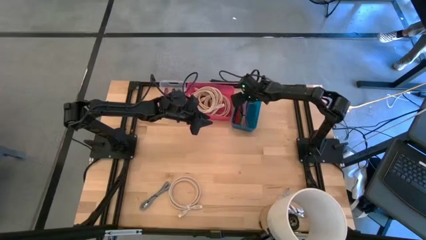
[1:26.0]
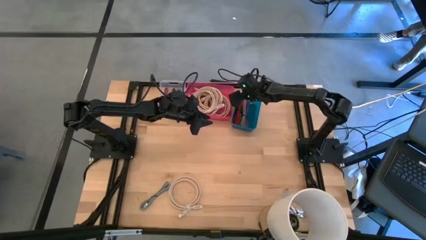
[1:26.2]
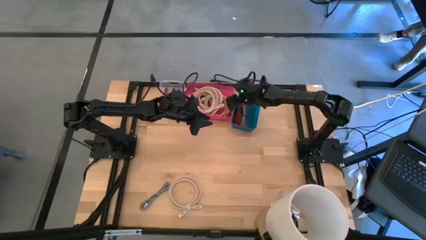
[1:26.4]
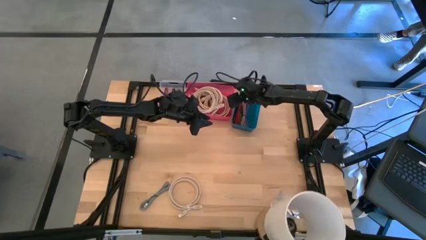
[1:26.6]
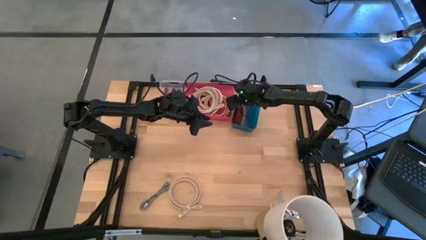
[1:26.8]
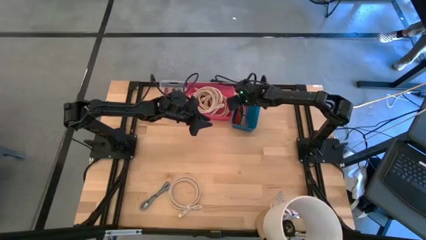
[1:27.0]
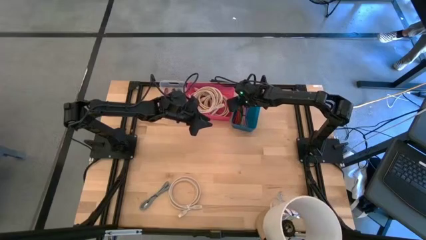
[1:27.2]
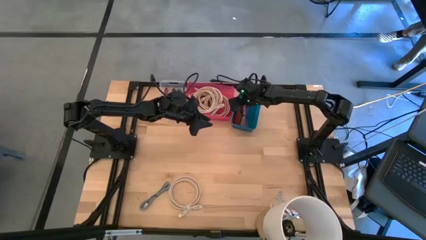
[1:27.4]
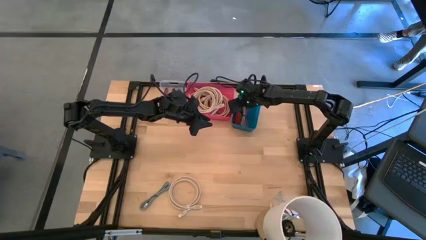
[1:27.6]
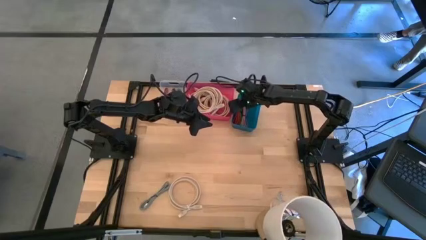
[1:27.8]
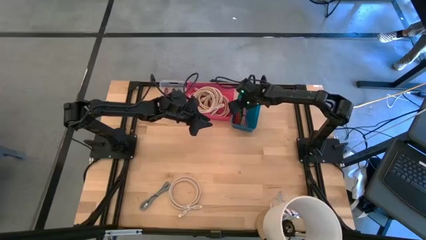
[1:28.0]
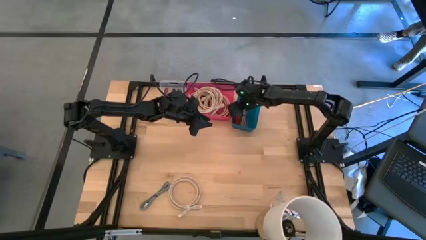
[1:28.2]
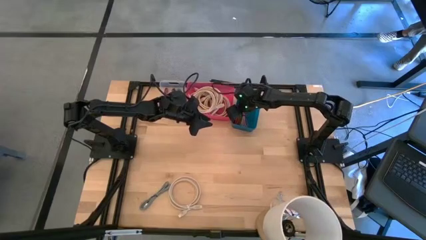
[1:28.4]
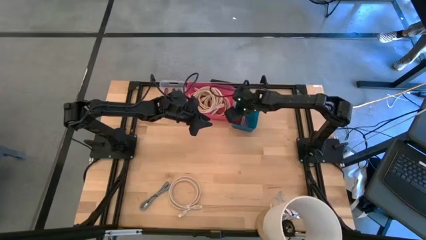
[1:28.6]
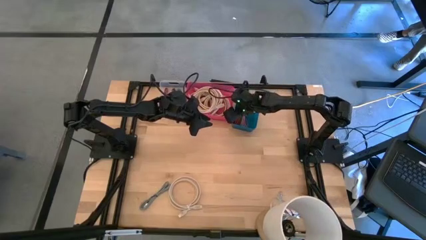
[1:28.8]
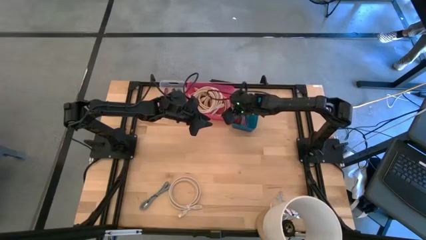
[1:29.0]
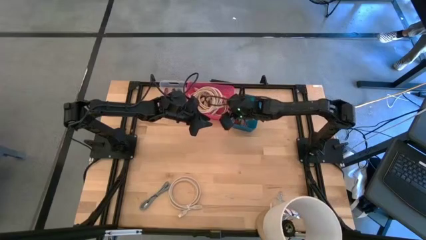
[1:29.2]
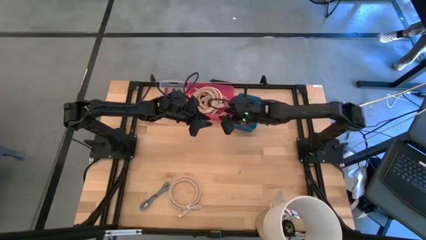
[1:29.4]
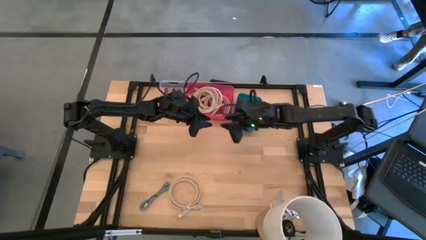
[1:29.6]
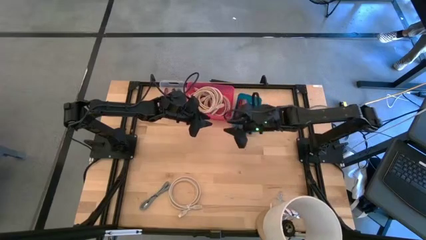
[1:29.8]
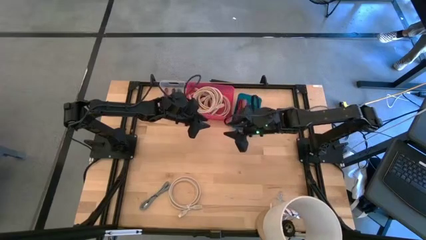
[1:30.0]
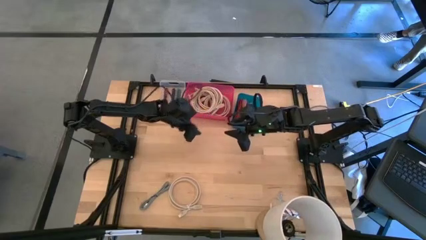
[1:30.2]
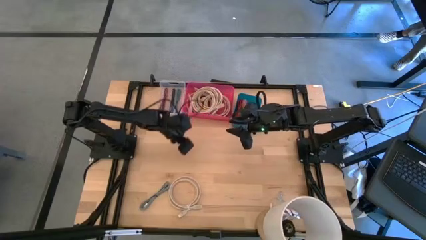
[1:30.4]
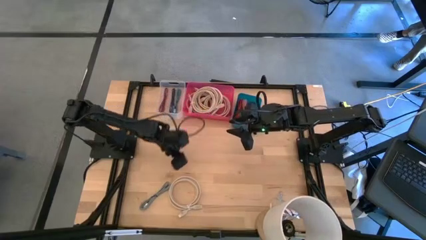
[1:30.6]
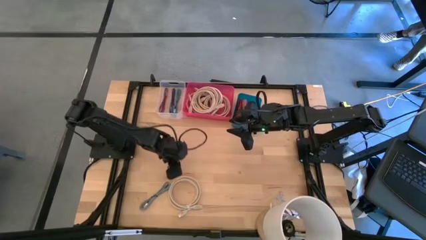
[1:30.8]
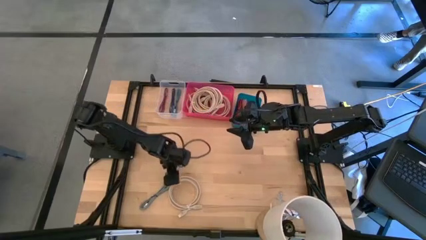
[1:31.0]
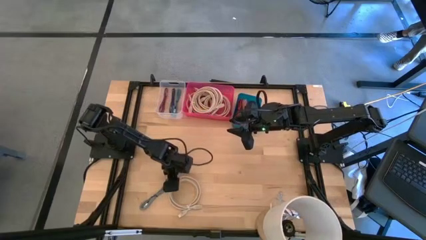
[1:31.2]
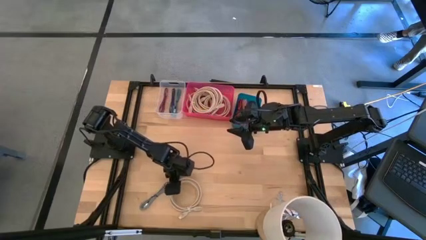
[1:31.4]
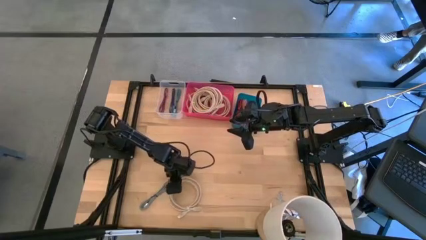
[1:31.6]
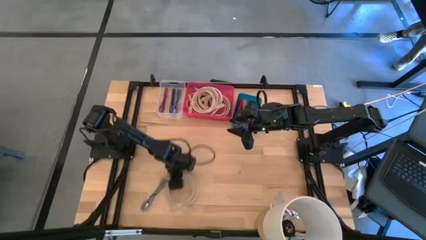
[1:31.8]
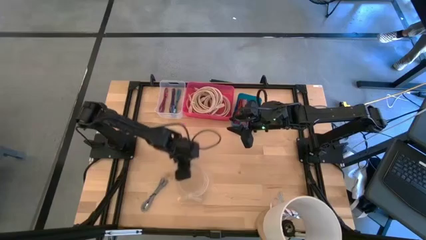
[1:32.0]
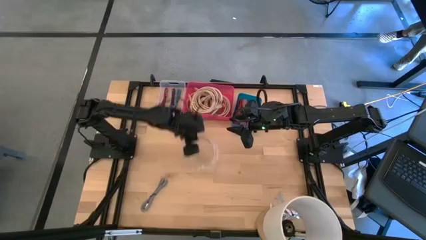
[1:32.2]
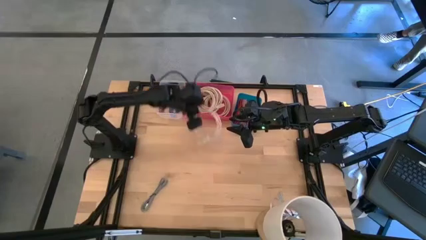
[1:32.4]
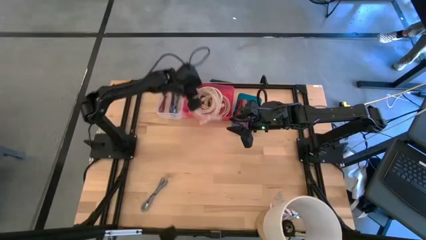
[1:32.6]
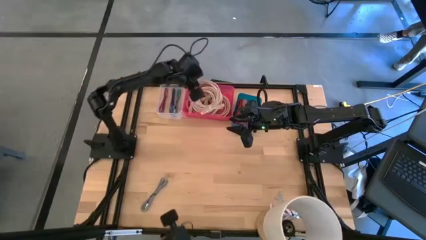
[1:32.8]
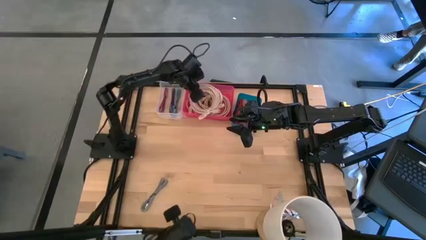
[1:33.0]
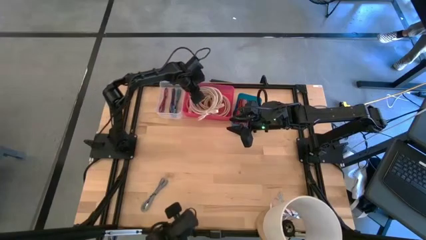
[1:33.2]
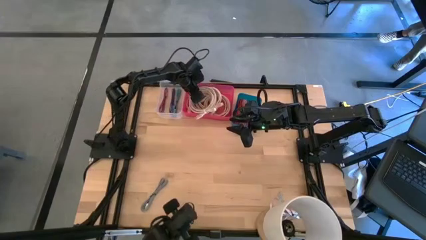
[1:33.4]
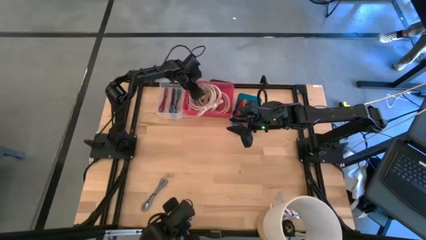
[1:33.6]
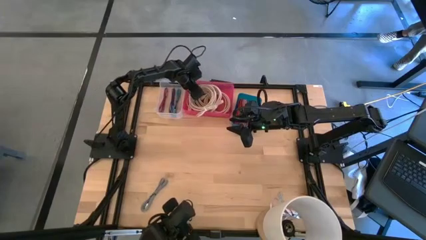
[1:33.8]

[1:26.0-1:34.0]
Task: Pick & Place USB Port
Put the light brown HDMI cable into the pink bin

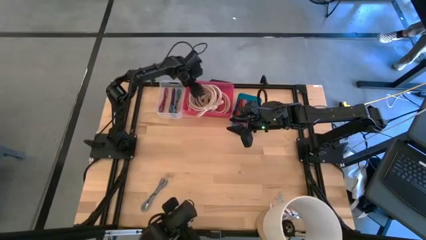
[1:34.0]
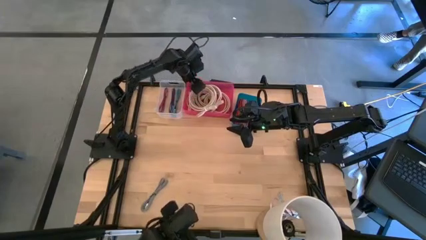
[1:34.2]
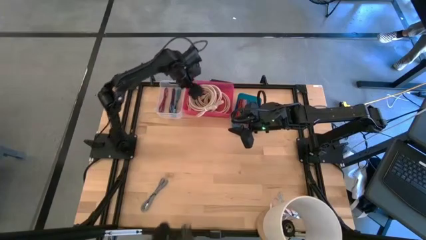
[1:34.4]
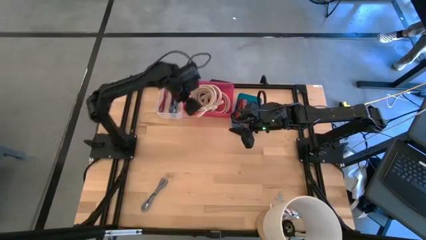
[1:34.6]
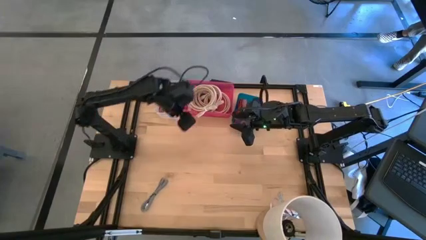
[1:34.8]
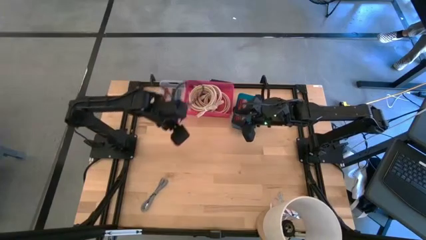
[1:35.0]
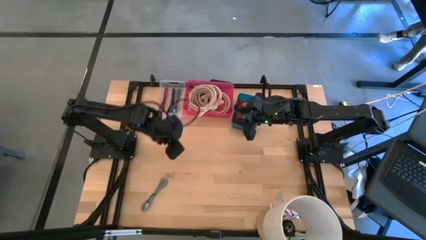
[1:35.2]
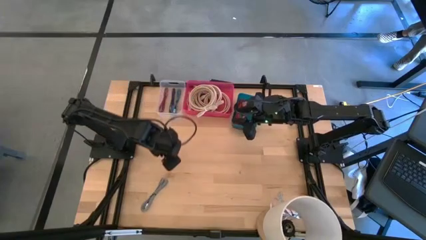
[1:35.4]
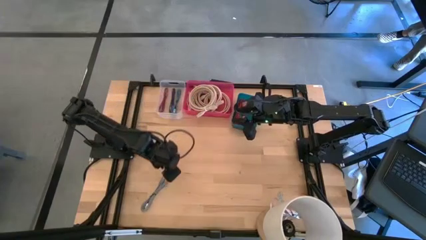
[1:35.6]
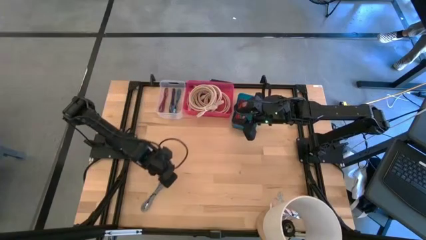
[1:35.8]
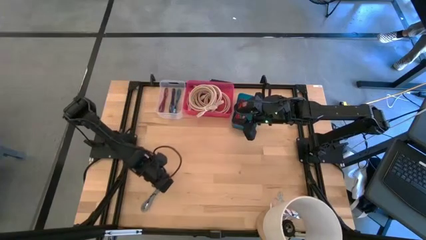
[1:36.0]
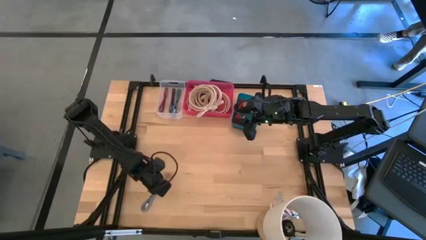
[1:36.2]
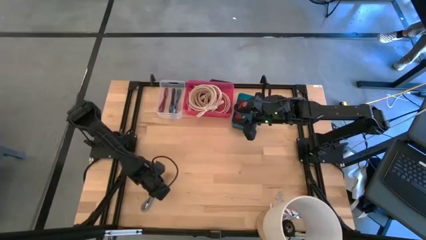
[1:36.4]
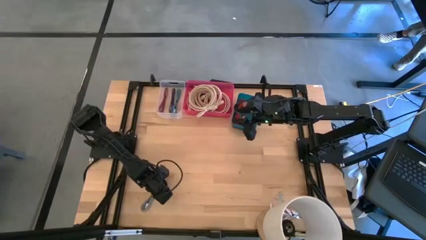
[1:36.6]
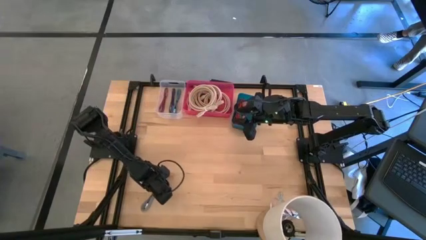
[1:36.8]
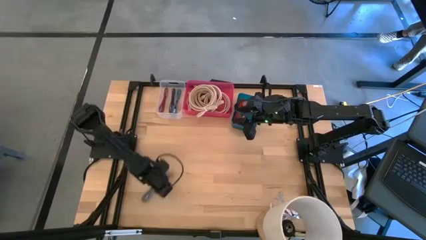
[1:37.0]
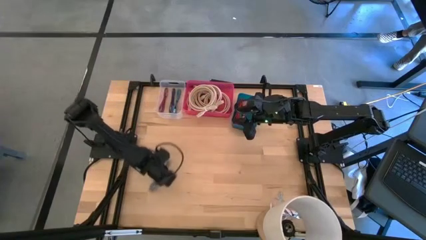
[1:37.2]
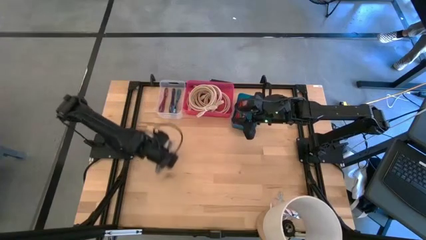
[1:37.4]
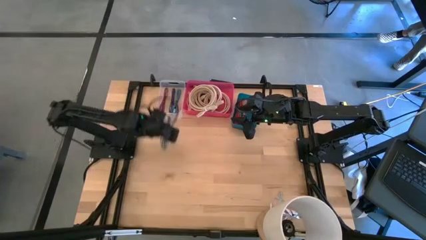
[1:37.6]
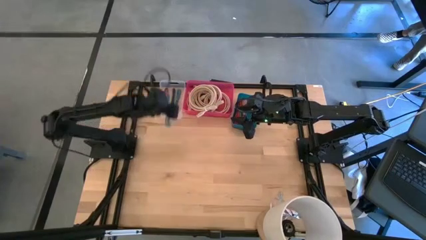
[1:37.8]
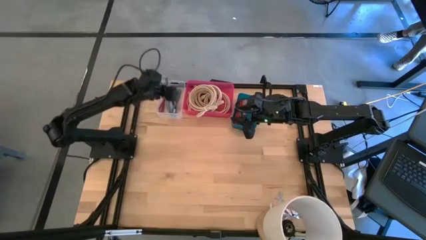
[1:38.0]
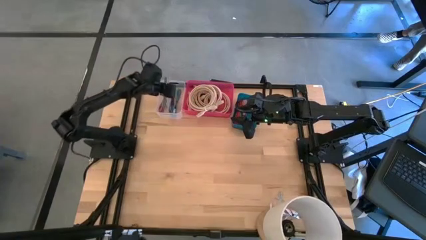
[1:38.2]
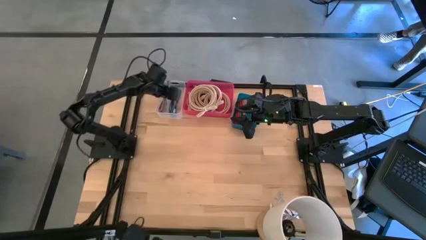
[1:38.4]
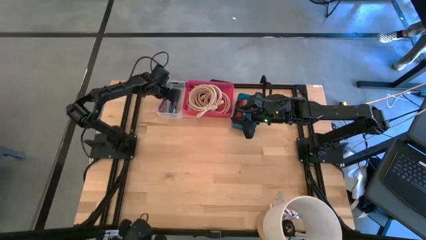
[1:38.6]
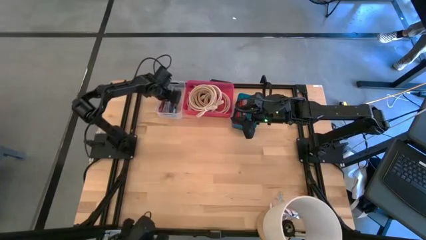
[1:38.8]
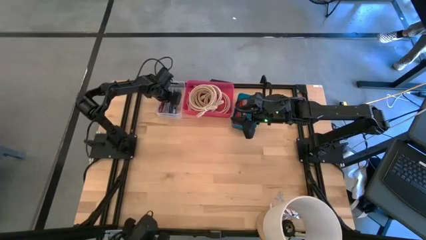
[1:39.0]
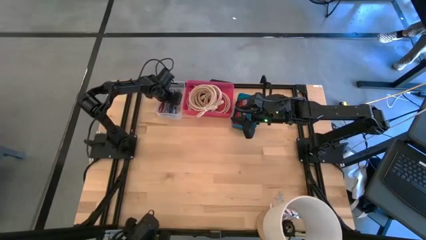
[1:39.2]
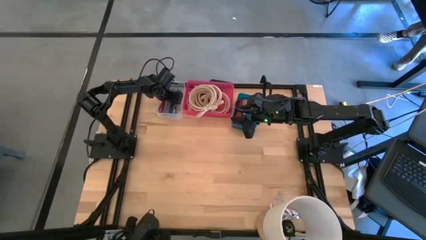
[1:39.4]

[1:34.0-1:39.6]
Put the white and black charger cable into the transparent bin

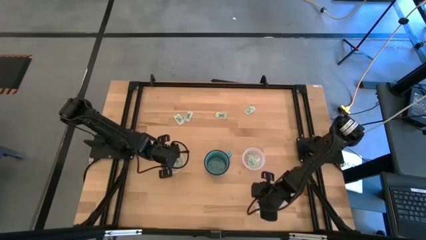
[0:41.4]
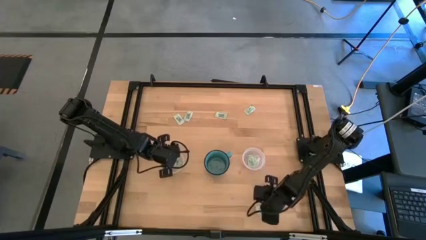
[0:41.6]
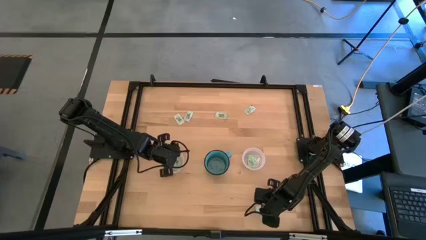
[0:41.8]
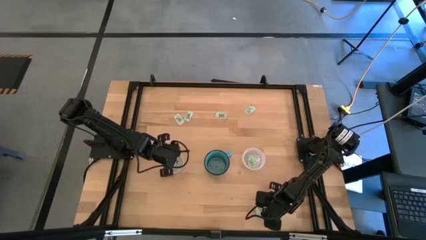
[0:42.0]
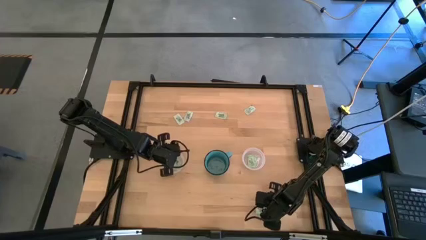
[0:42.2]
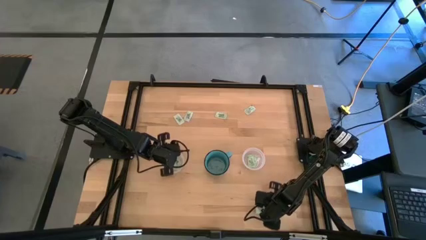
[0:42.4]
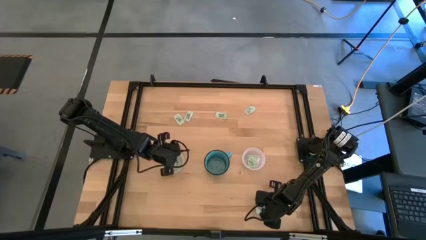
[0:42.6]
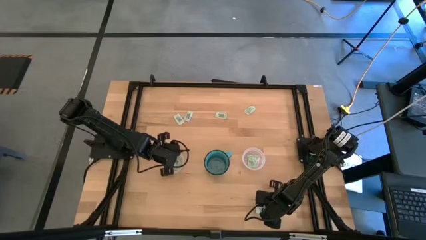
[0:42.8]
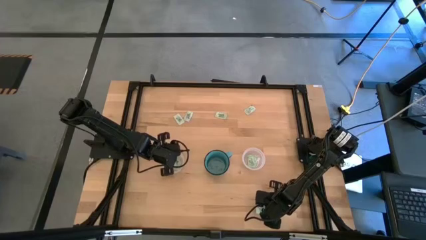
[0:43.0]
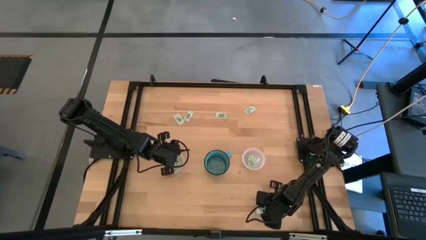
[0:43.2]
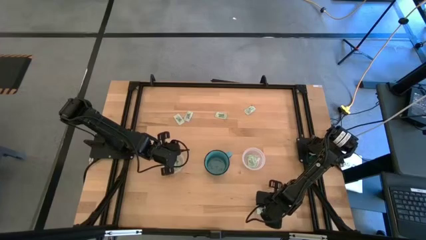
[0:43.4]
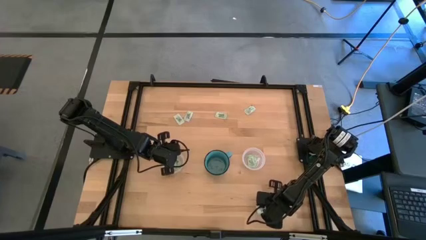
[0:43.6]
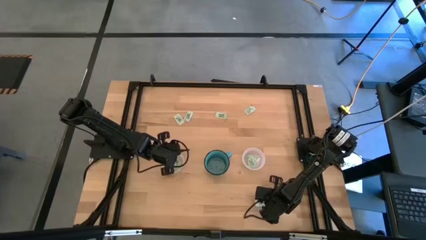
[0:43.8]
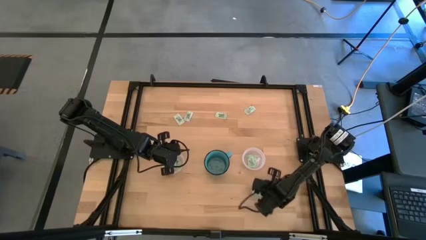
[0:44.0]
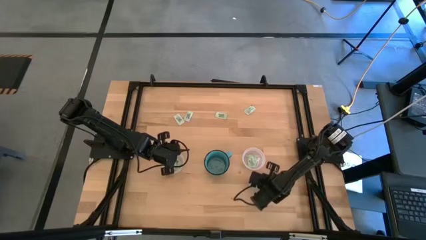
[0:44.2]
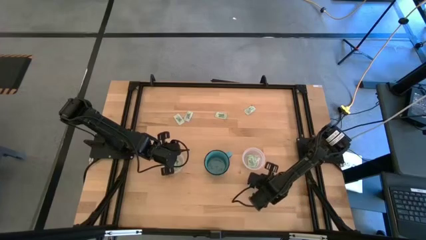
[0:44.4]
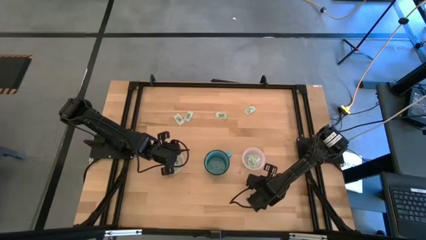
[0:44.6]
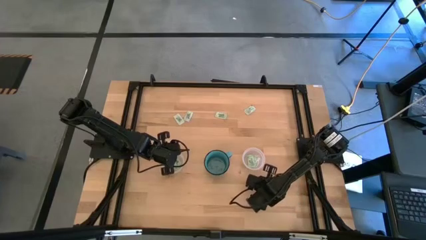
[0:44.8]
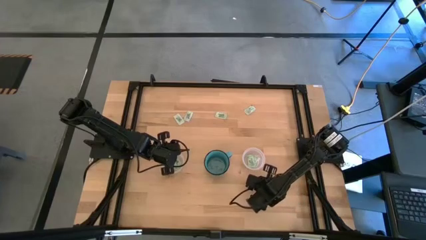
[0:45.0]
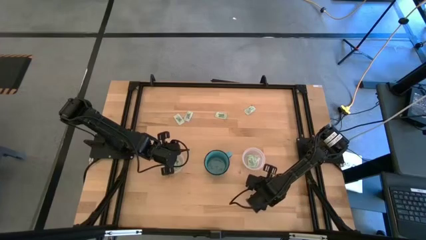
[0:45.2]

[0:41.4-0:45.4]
Task: Pick and place Stevia / Truvia into bins
Put the green stevia packet into the right transparent container
